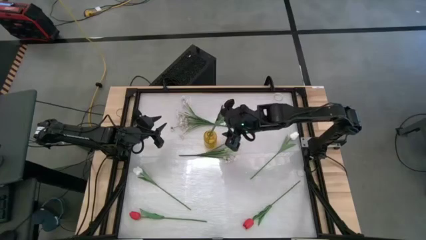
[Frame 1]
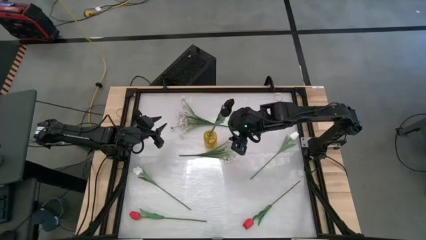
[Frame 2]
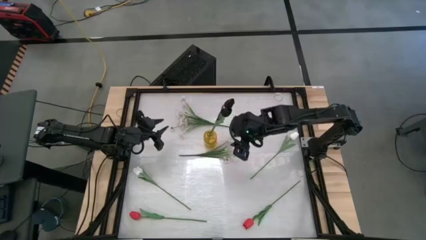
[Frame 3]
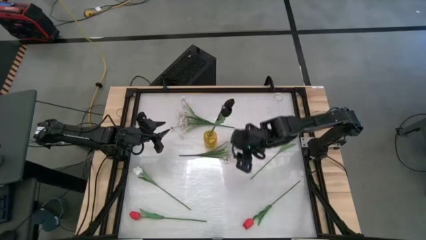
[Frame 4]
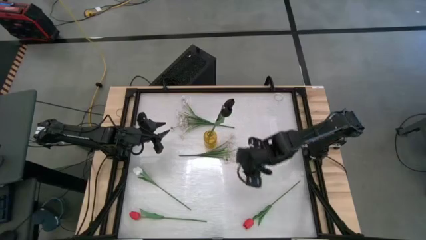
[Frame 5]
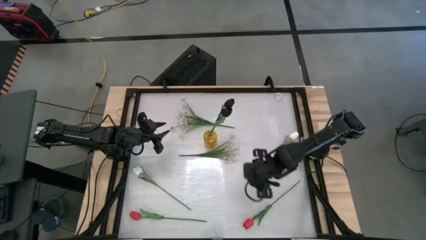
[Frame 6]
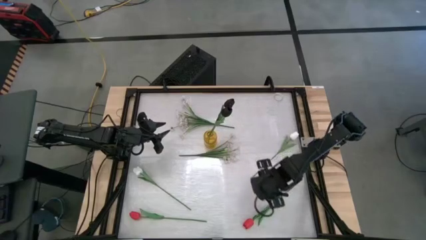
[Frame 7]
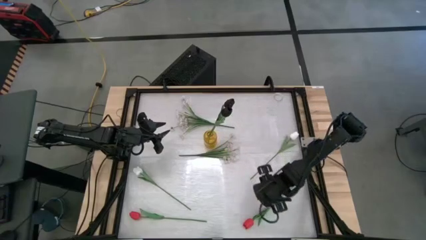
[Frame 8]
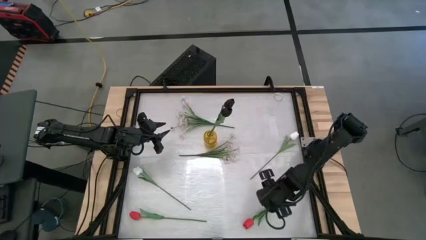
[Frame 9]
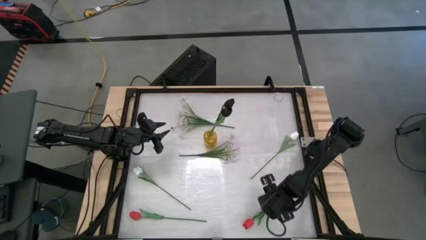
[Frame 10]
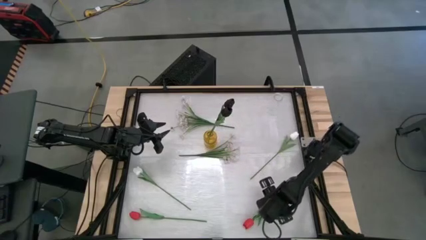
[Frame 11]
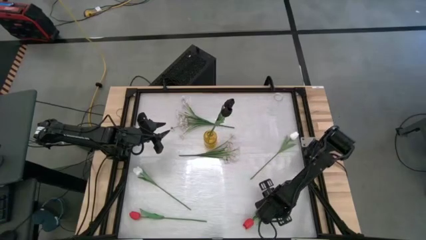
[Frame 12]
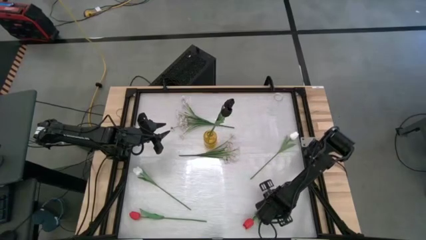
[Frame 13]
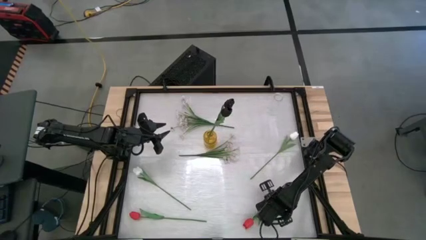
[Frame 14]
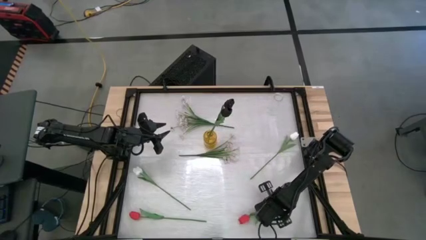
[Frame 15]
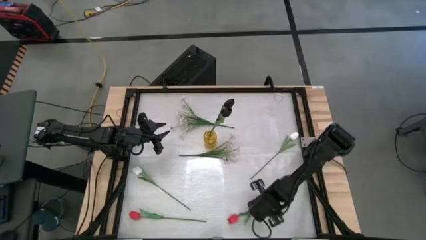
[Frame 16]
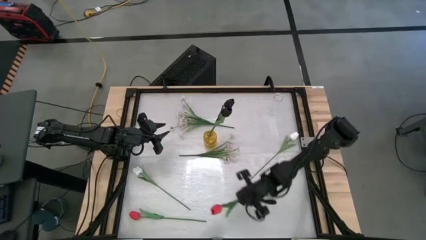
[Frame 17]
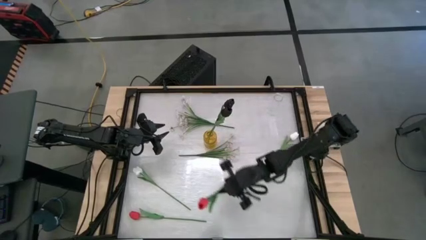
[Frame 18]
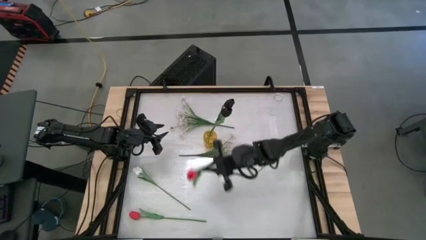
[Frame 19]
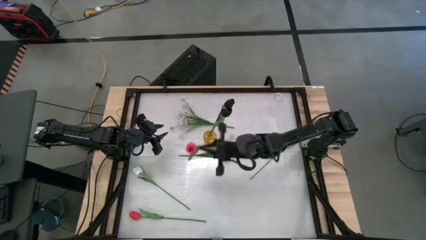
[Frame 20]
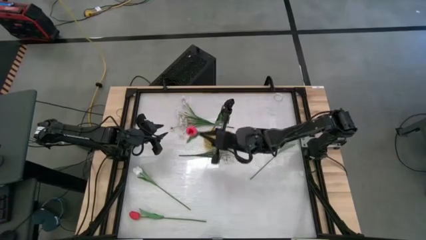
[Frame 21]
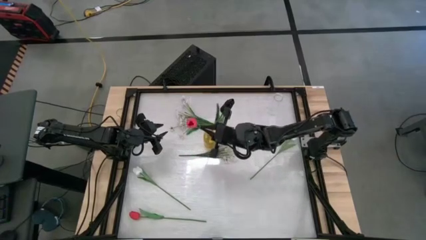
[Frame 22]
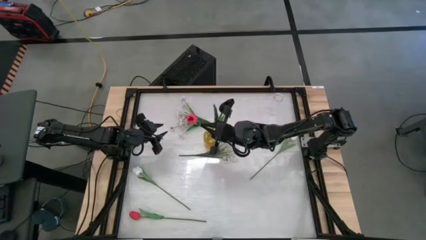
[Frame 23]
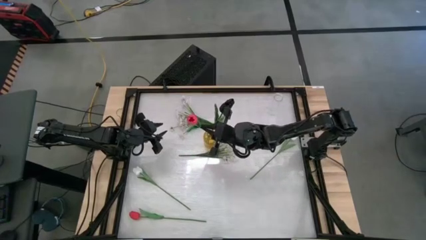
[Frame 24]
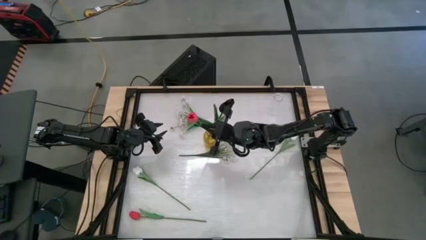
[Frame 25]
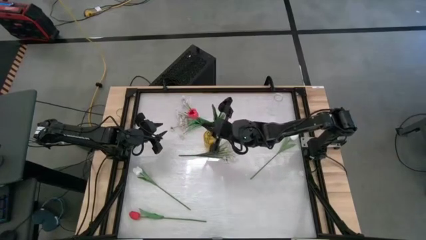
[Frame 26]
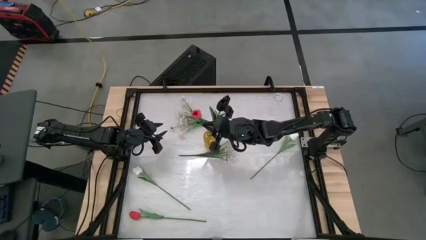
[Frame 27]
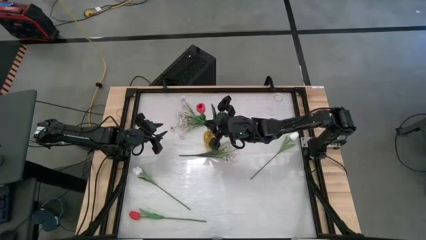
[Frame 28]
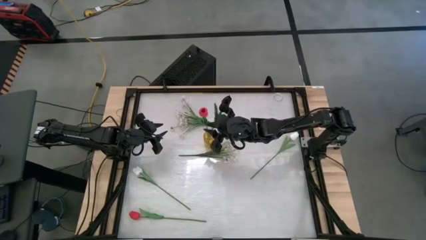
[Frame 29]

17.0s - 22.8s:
Task: Sort flowers into vase by color
Put the right red tulip into the yellow flower vase

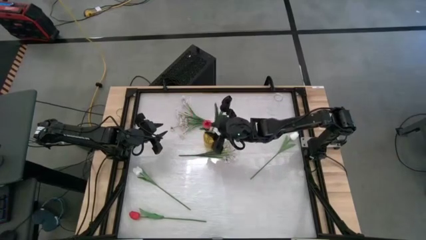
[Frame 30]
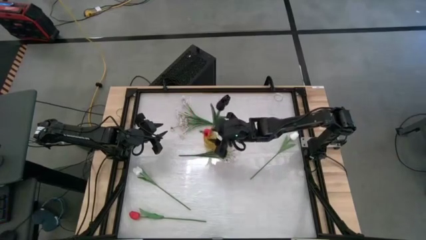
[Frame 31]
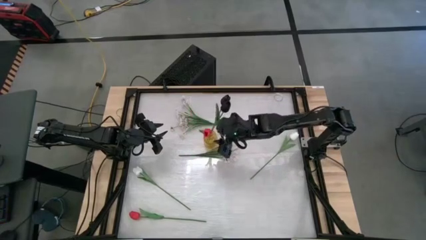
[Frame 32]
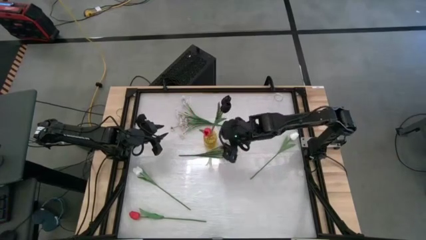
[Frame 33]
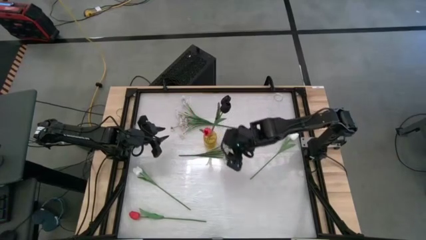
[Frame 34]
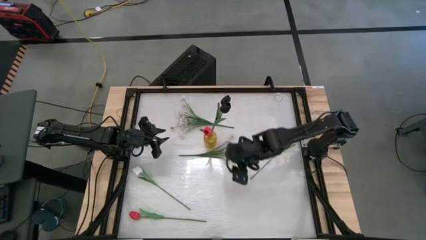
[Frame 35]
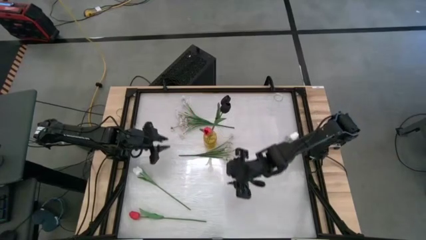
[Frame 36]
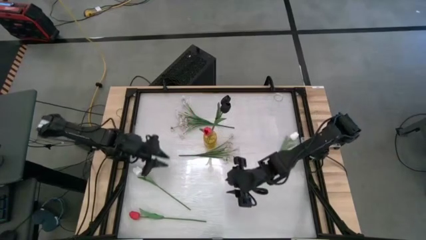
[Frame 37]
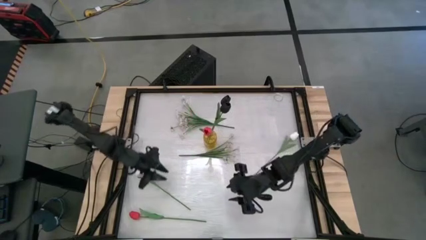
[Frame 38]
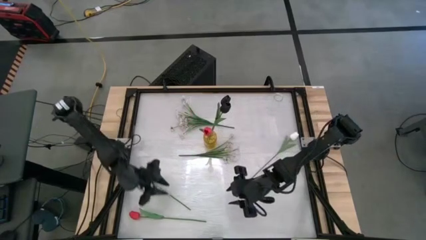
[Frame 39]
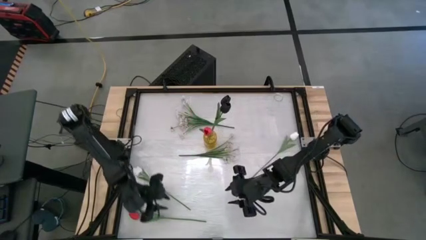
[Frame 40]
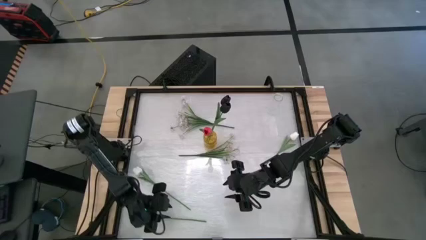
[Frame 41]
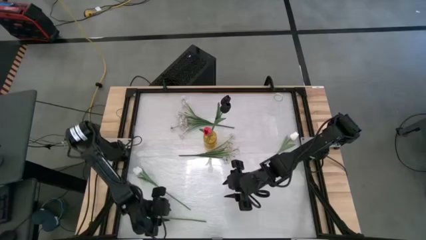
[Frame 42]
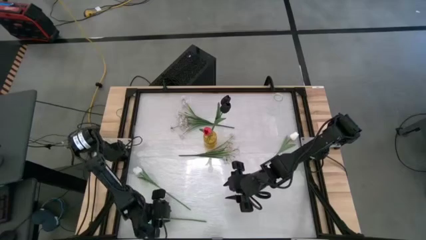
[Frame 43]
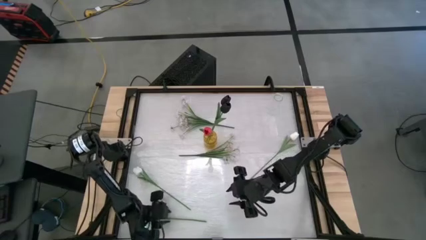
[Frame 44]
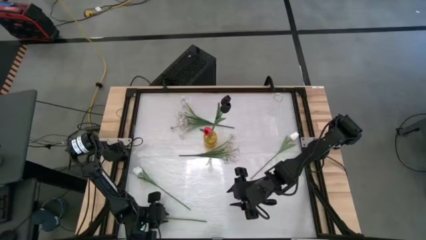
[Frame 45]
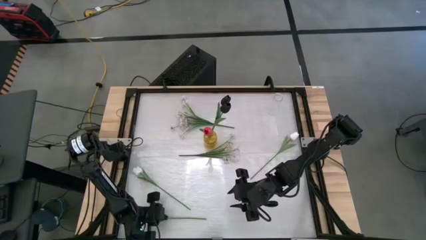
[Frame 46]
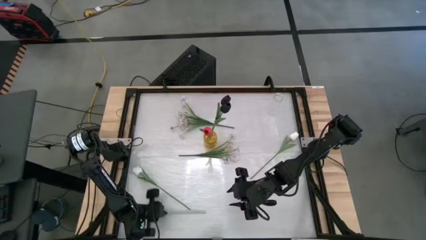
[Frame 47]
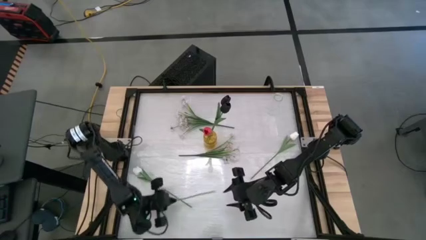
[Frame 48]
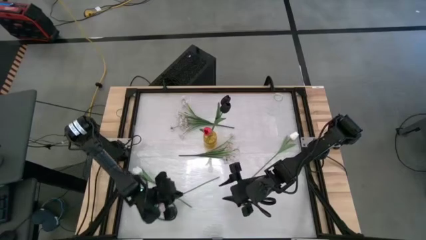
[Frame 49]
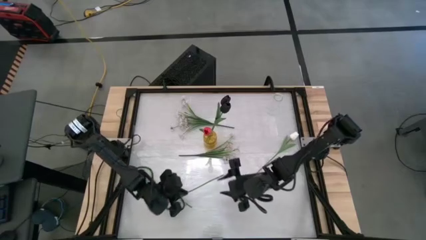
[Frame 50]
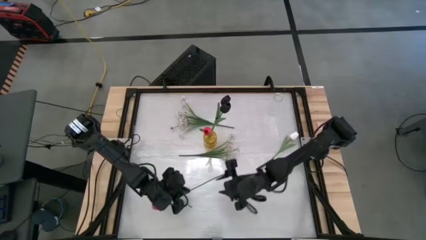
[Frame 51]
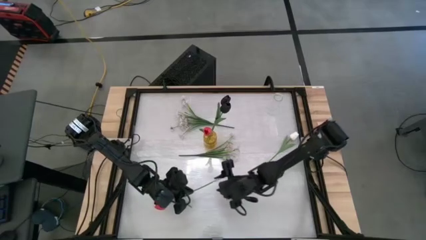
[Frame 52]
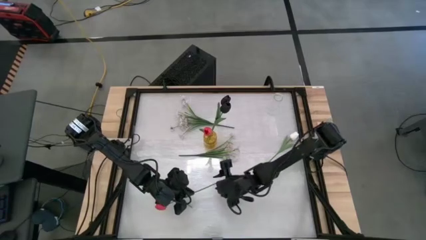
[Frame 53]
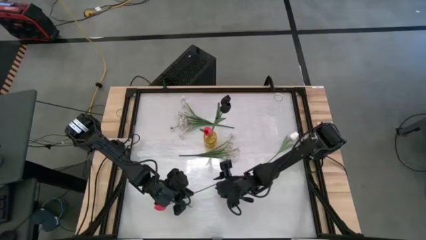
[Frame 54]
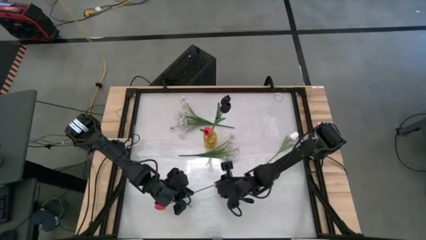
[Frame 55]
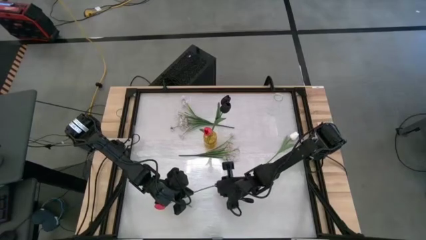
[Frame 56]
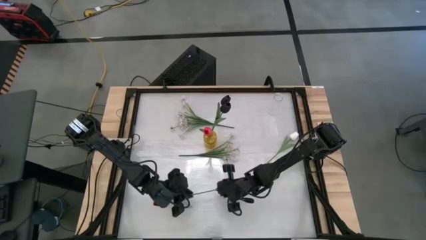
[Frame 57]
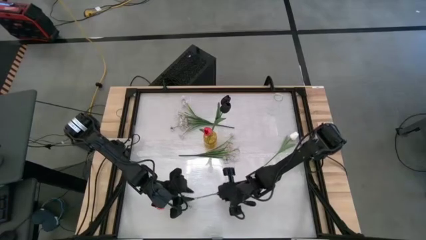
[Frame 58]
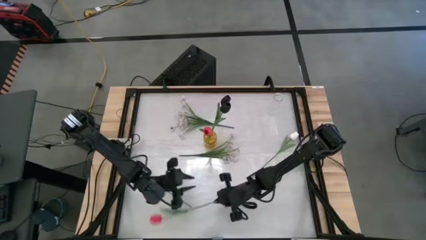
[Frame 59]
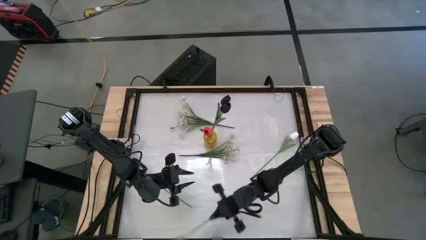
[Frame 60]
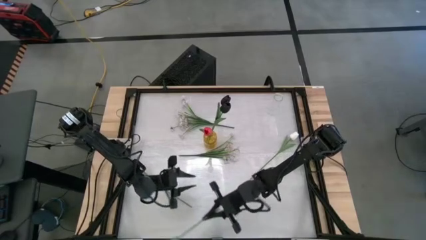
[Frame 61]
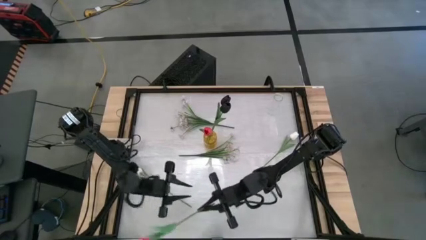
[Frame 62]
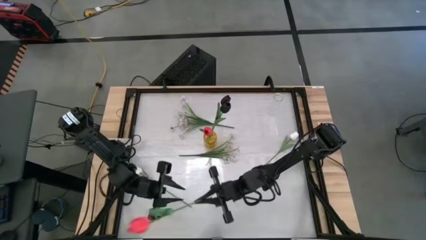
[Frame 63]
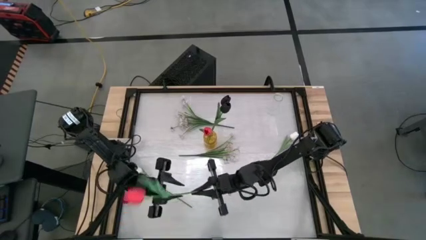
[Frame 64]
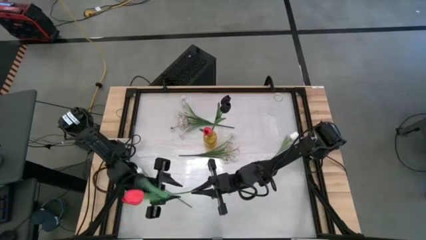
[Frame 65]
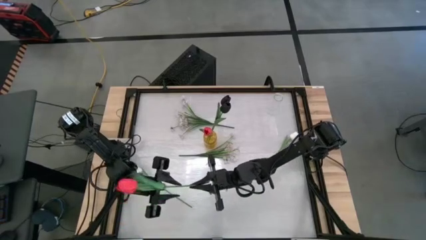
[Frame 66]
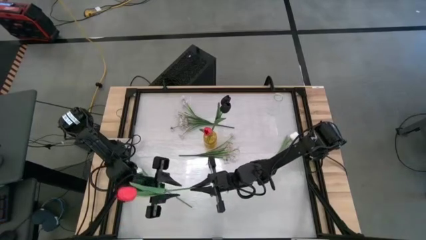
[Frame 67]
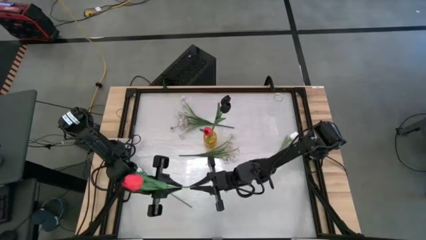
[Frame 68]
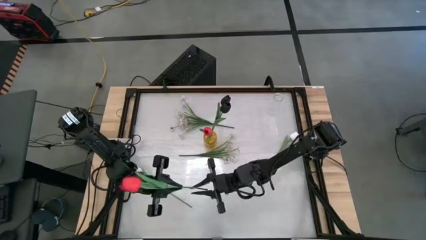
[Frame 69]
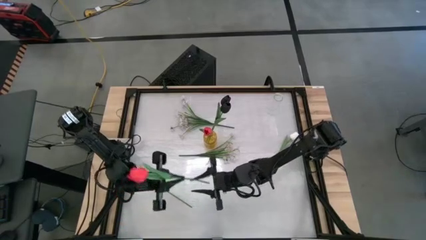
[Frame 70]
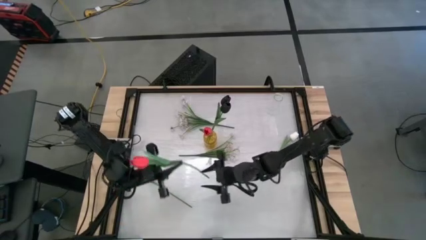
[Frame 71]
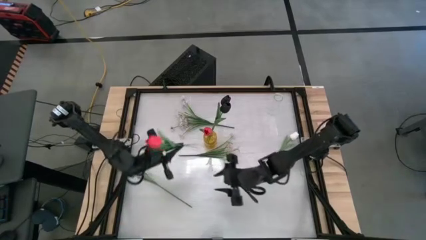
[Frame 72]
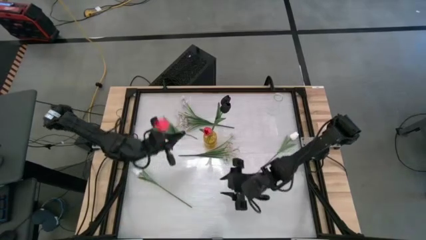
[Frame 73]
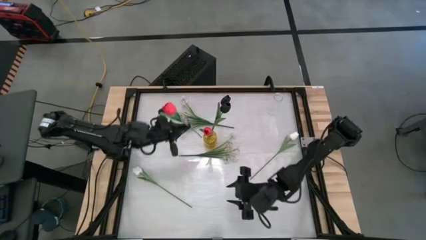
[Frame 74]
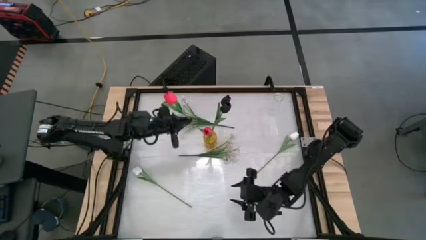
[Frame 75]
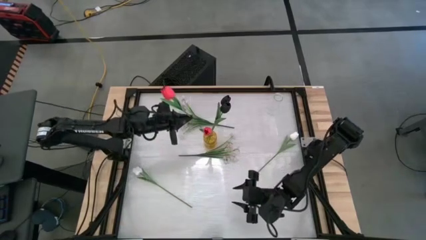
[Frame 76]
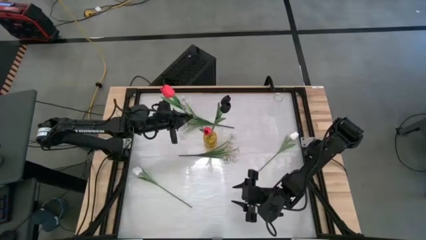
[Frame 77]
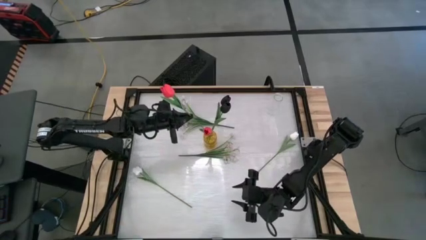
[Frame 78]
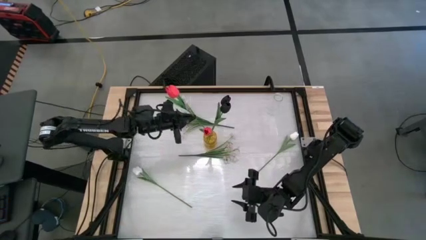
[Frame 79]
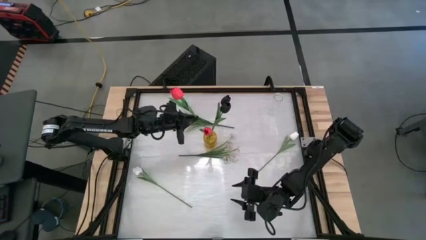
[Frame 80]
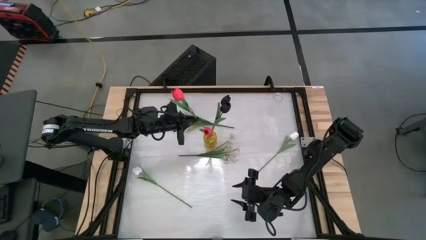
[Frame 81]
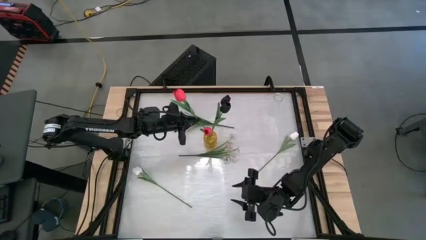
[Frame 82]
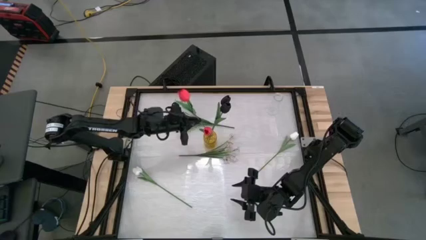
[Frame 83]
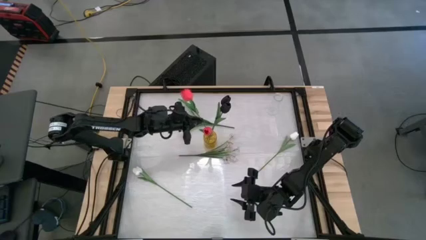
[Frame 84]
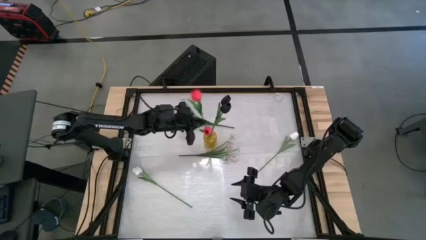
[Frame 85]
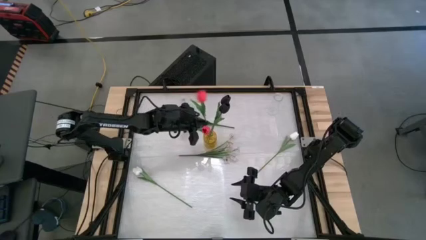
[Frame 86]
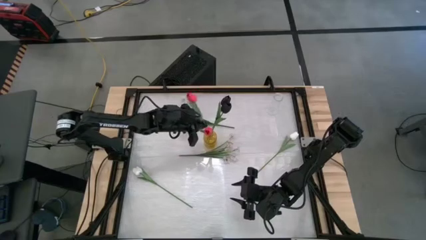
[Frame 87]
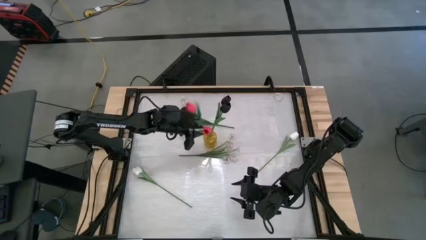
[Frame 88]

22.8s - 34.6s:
Put the red tulip into the yellow flower vase
